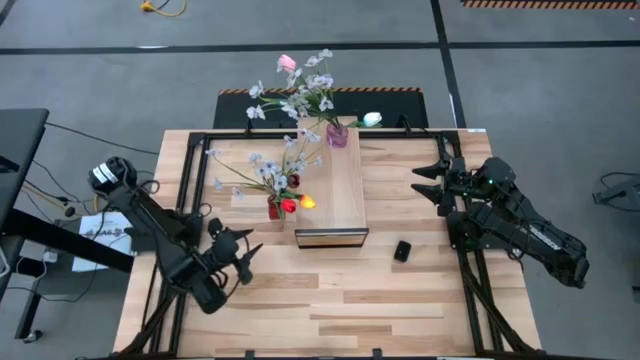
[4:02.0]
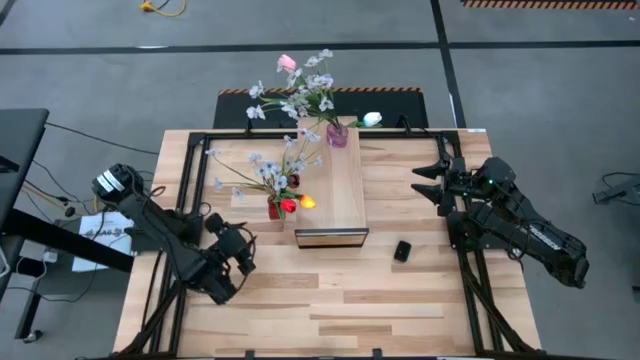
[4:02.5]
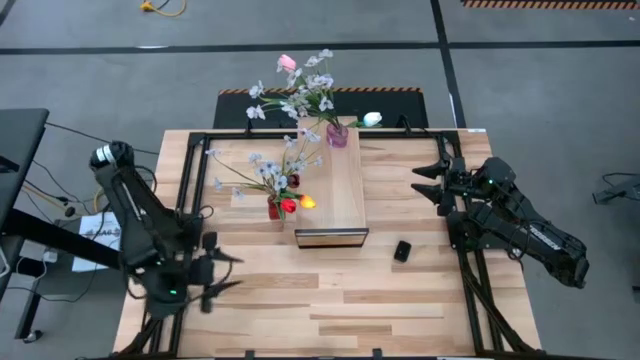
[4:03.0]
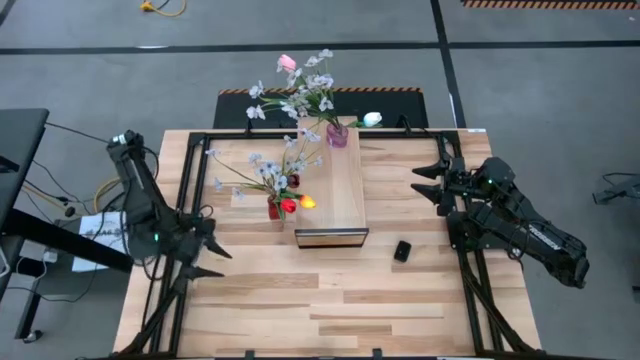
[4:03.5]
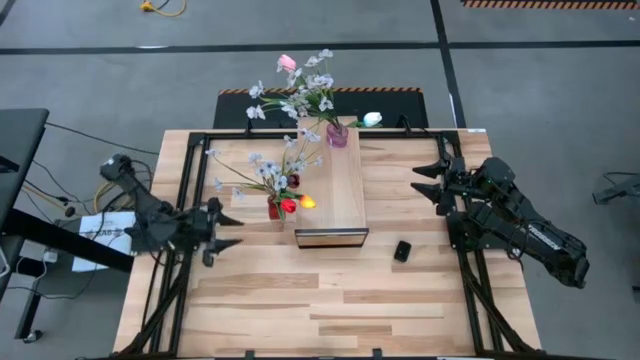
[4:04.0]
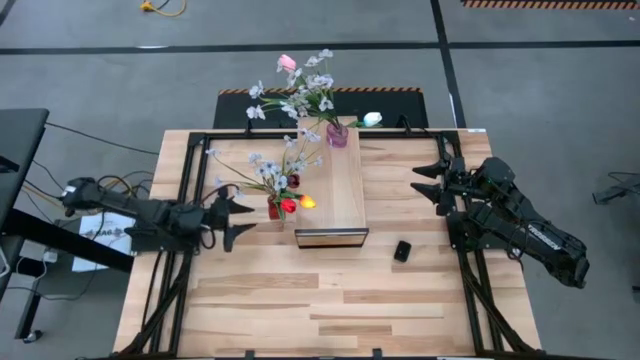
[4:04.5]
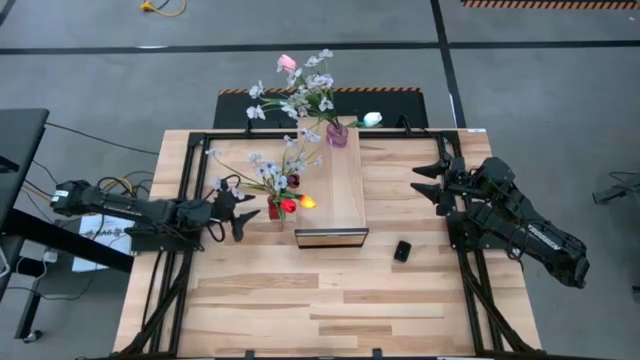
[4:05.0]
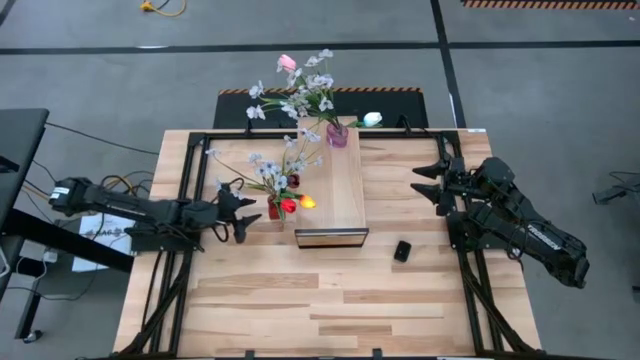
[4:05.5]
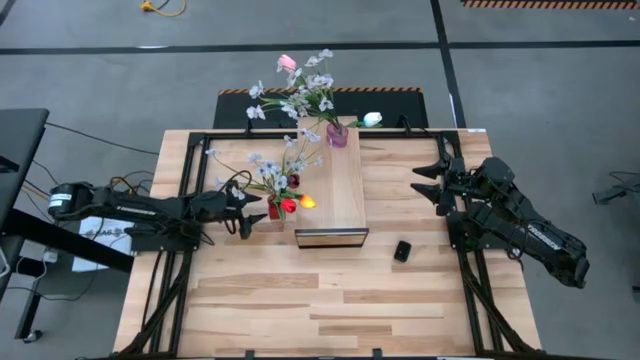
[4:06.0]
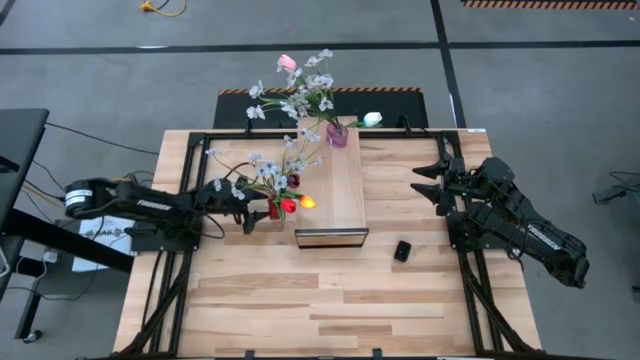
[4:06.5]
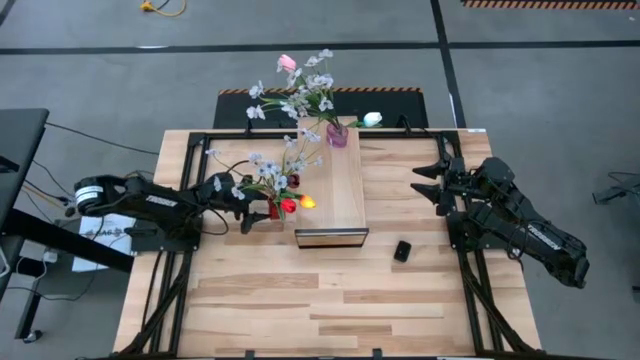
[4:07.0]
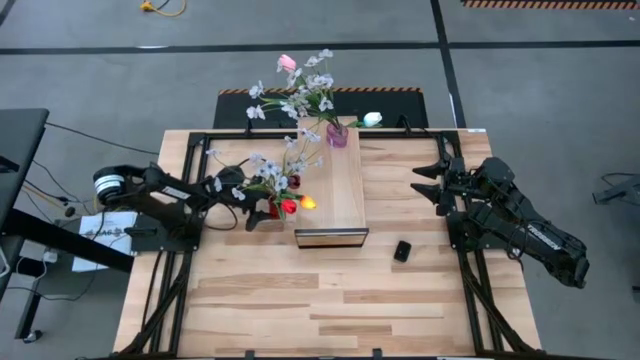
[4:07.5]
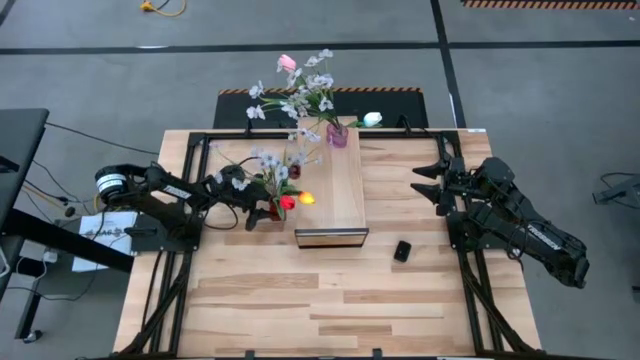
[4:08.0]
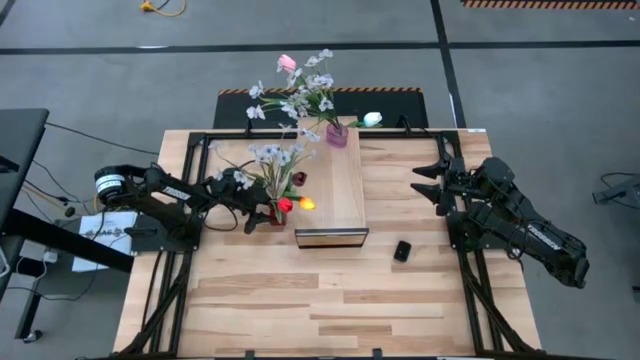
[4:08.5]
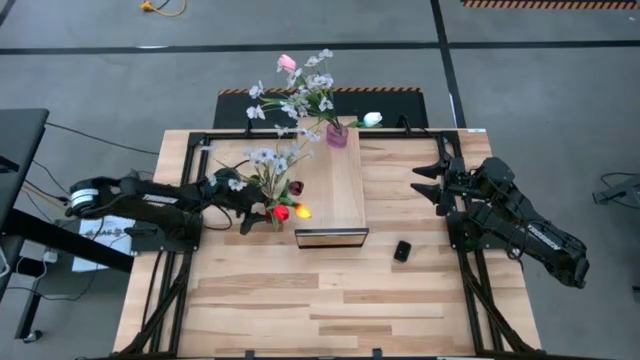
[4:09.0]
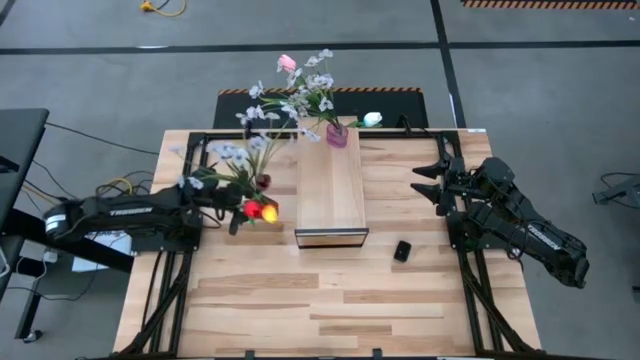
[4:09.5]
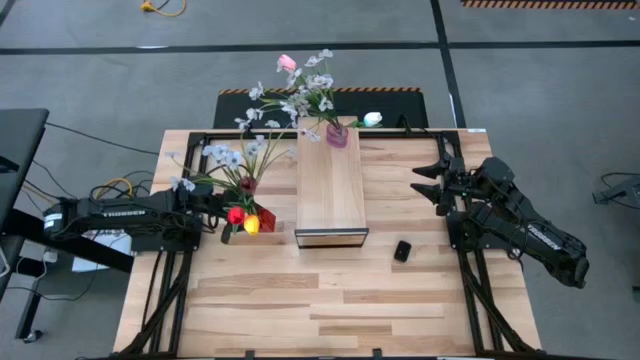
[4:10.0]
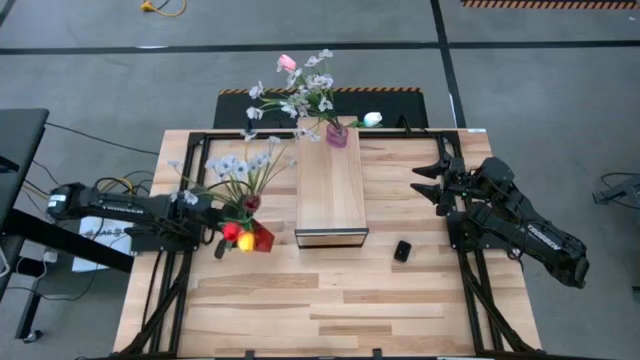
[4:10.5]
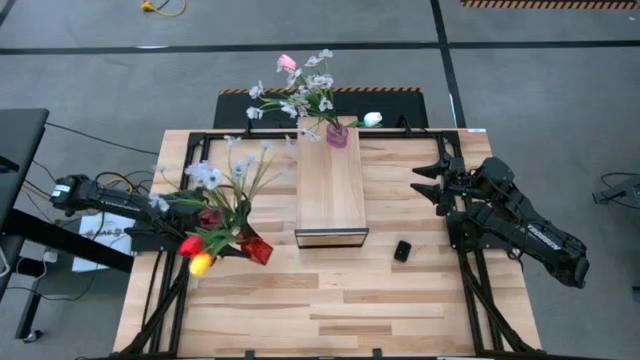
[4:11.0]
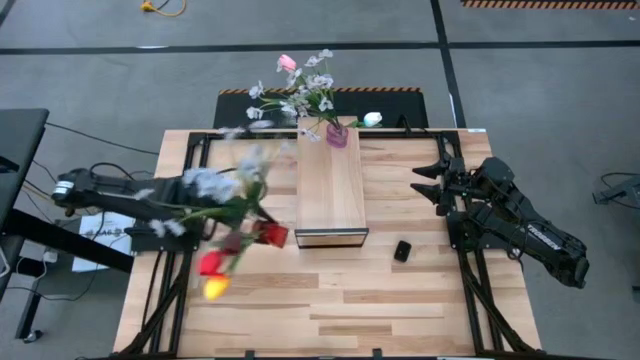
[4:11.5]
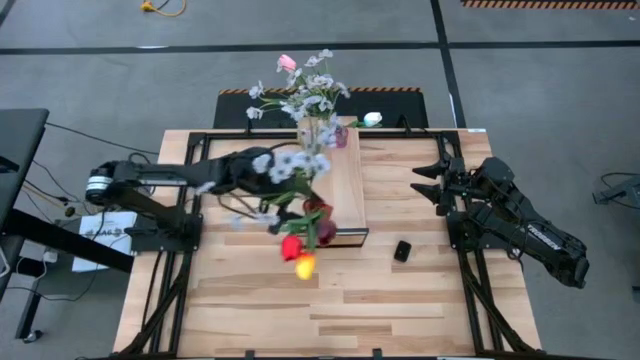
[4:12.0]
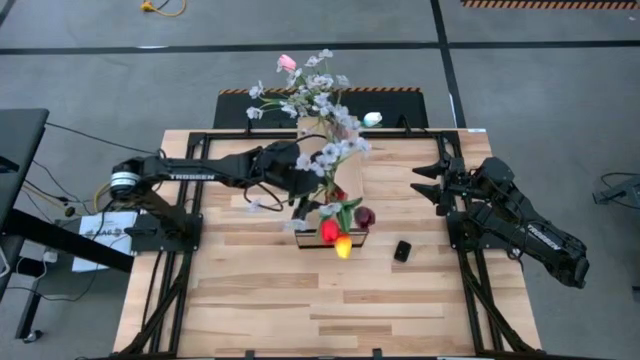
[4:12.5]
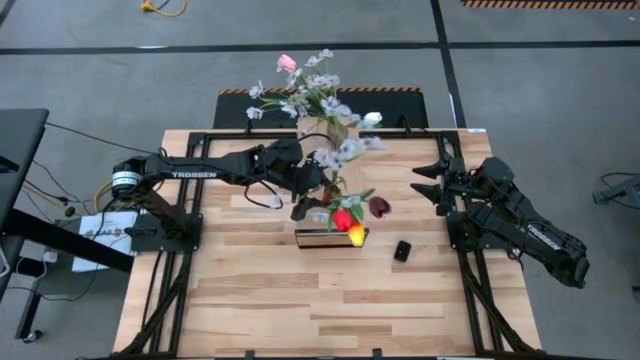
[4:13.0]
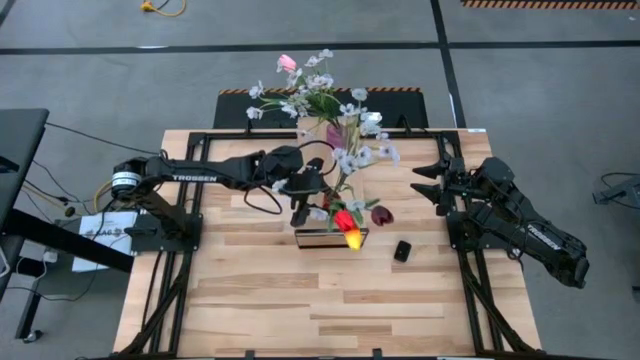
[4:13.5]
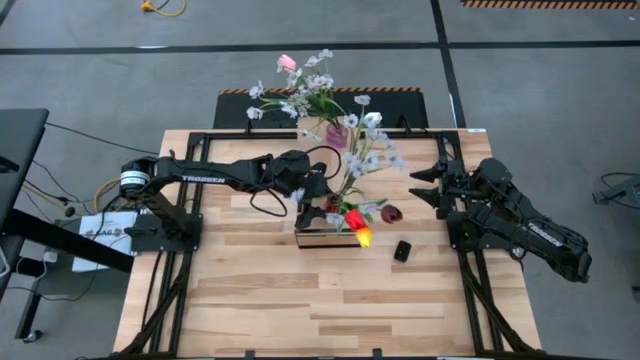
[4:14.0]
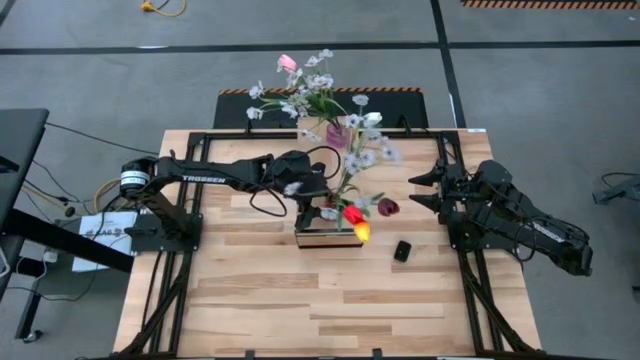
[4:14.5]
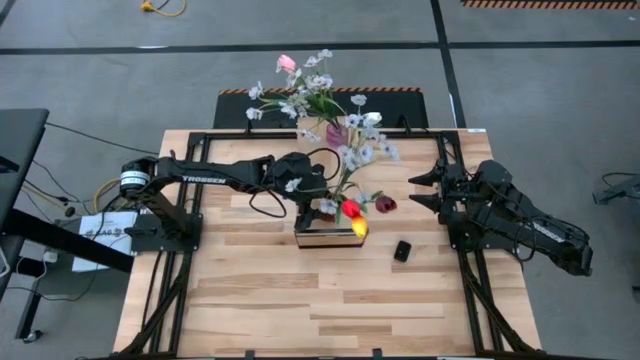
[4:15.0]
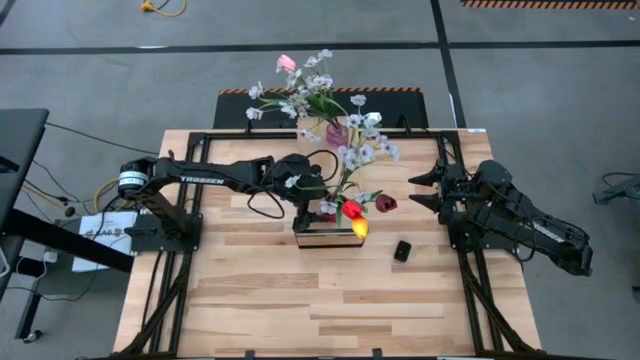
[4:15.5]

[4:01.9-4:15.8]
Task: Pick and place flowers into a vace then onto a shelf
Put the red flower vase with flowers on the shelf

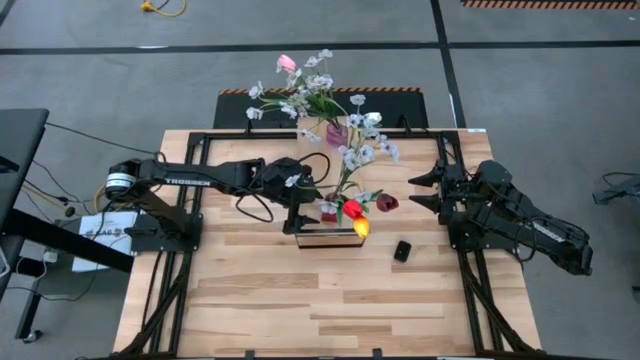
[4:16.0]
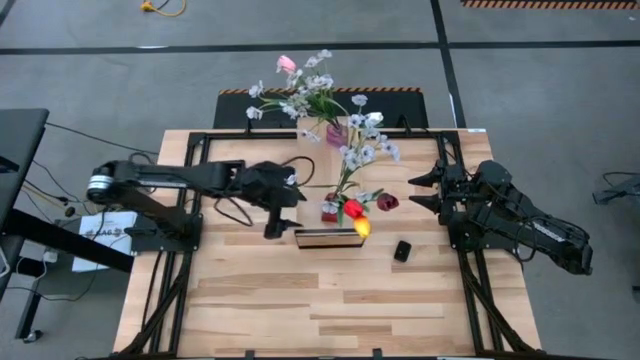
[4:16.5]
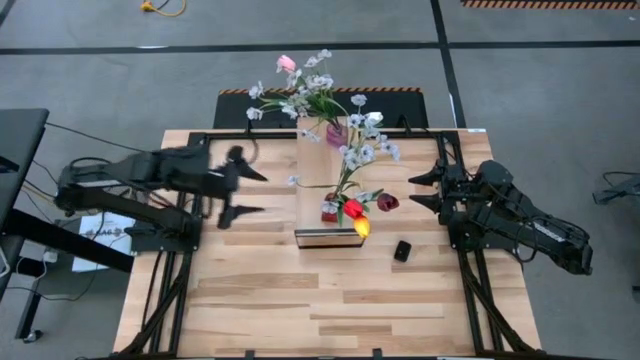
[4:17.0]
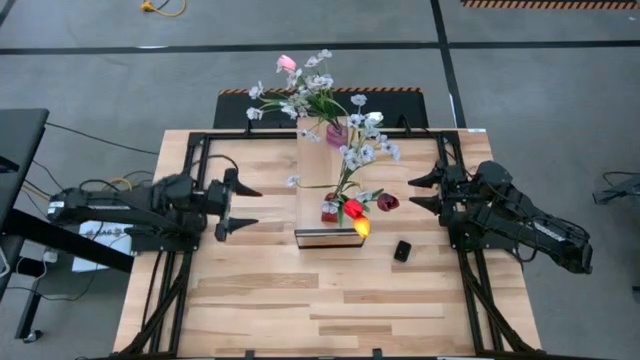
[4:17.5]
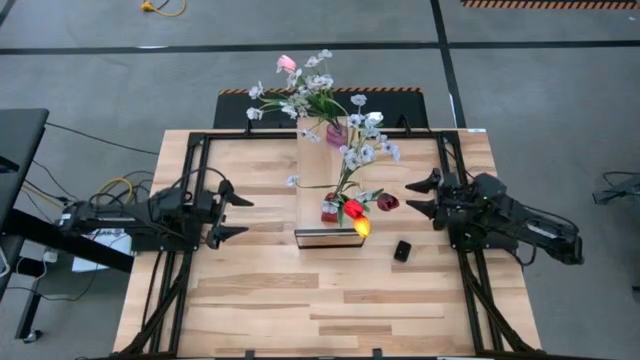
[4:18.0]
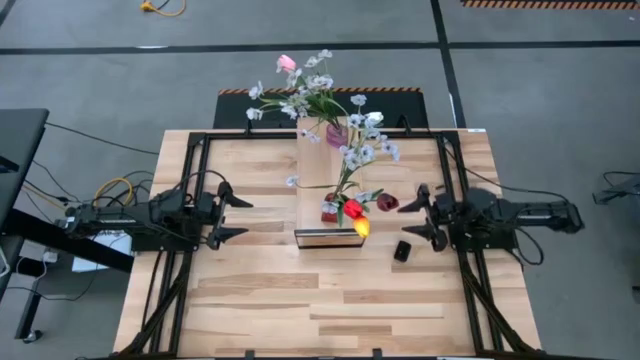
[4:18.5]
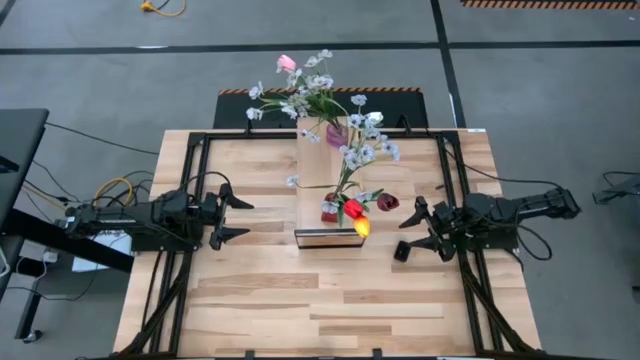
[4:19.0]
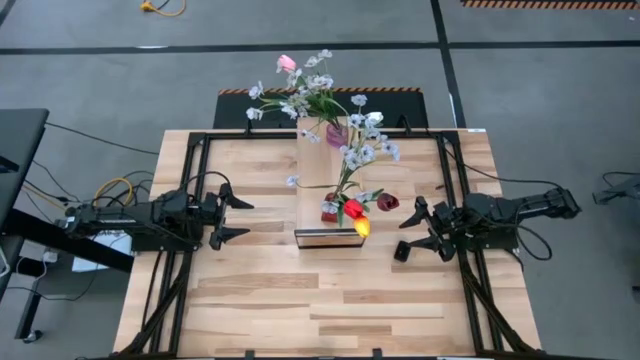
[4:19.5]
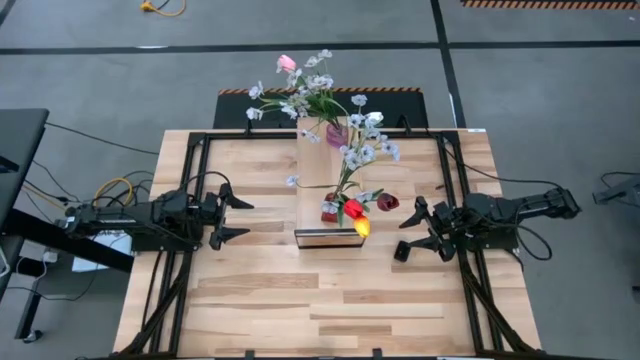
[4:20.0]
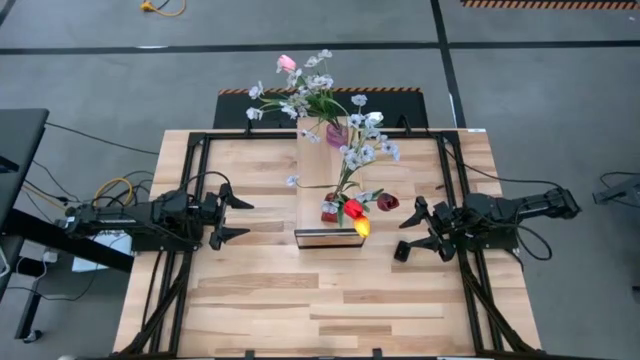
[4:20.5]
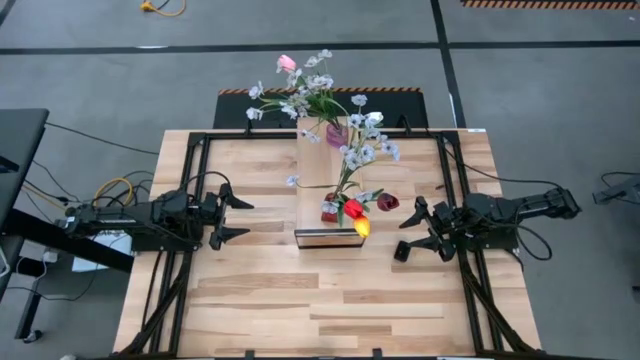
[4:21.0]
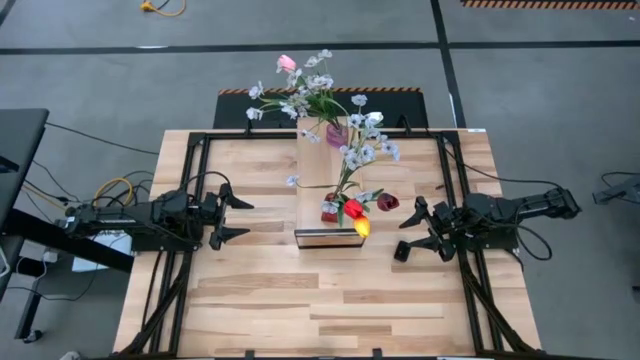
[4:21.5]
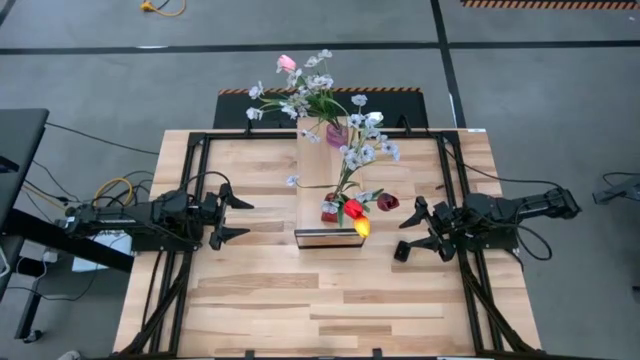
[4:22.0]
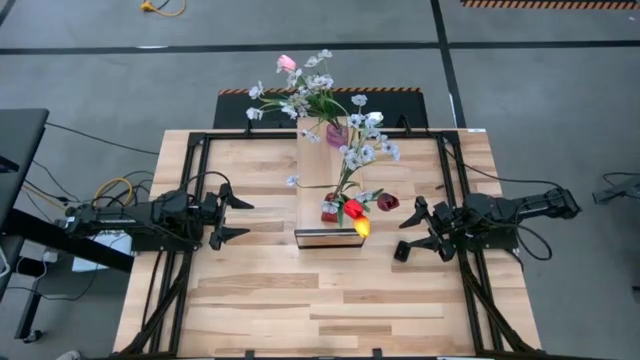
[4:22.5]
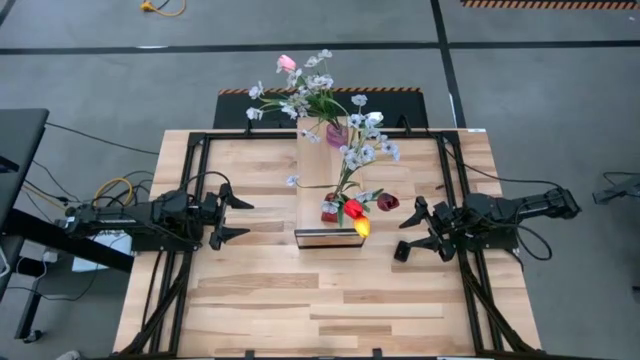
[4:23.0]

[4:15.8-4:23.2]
Return to Home Position
